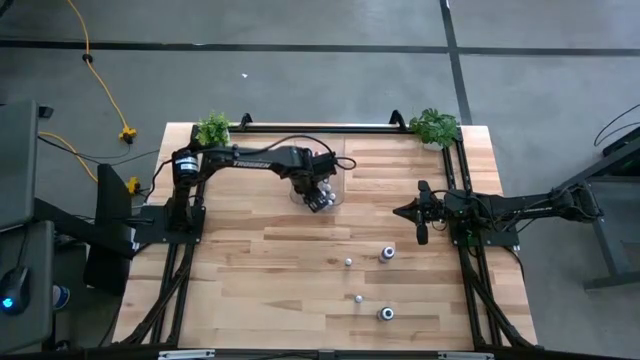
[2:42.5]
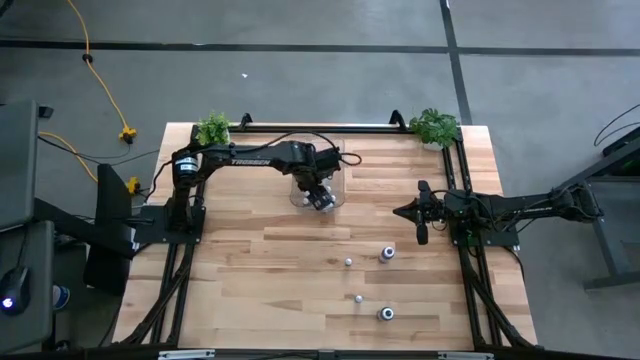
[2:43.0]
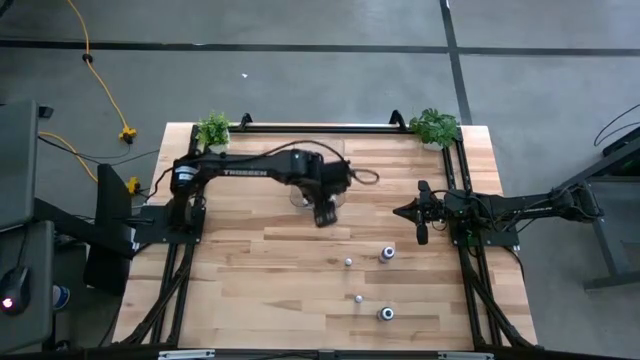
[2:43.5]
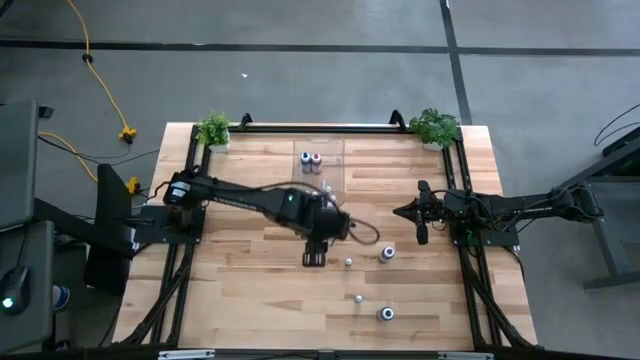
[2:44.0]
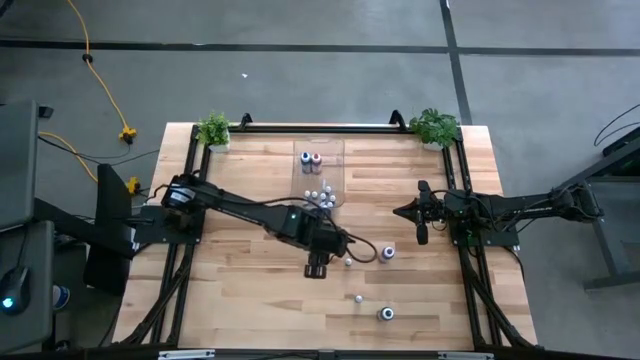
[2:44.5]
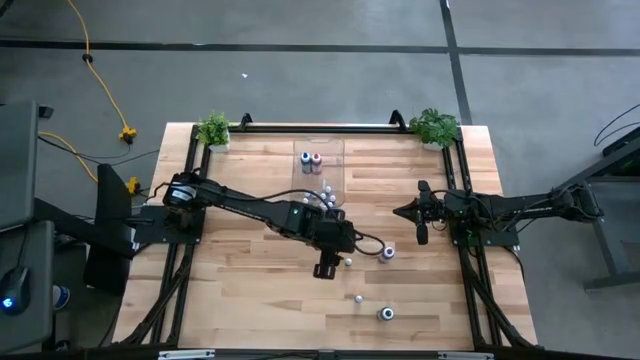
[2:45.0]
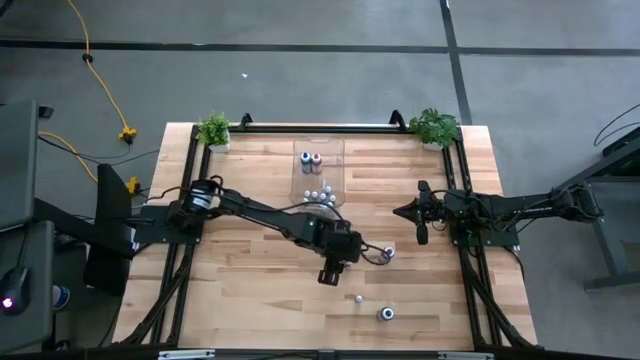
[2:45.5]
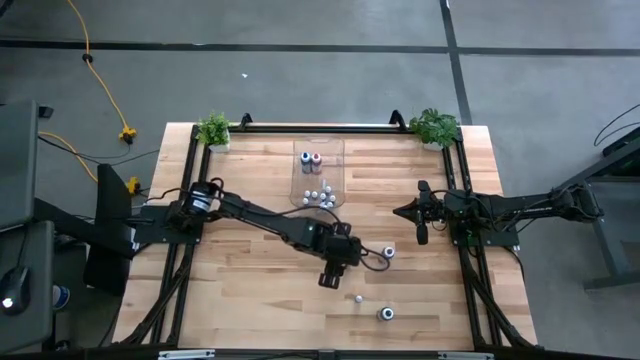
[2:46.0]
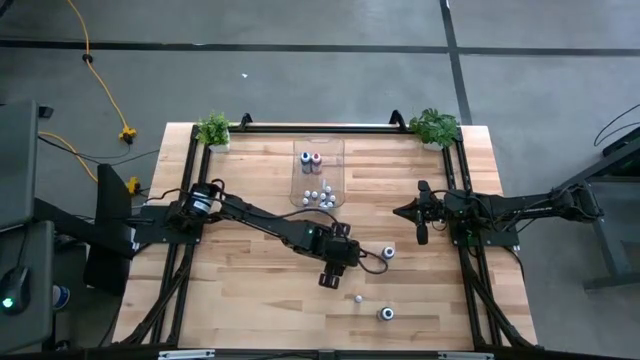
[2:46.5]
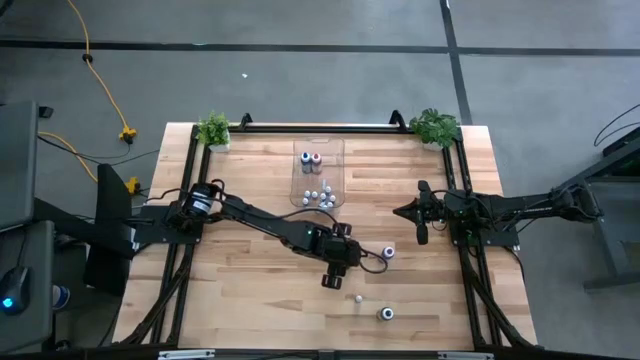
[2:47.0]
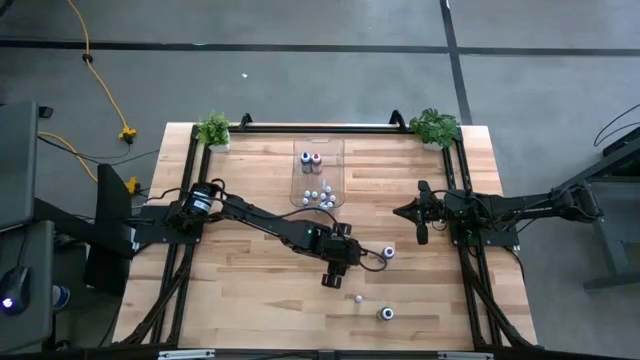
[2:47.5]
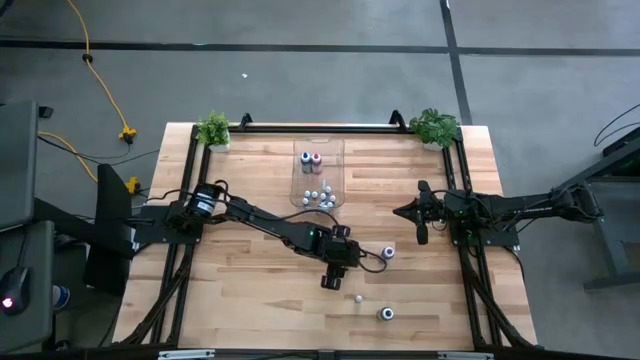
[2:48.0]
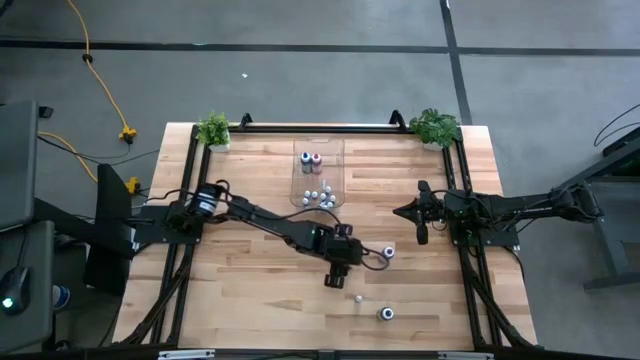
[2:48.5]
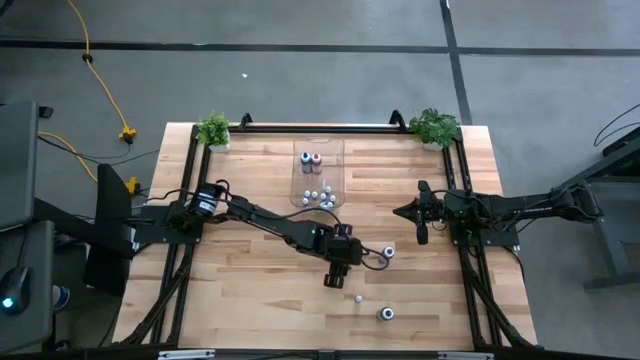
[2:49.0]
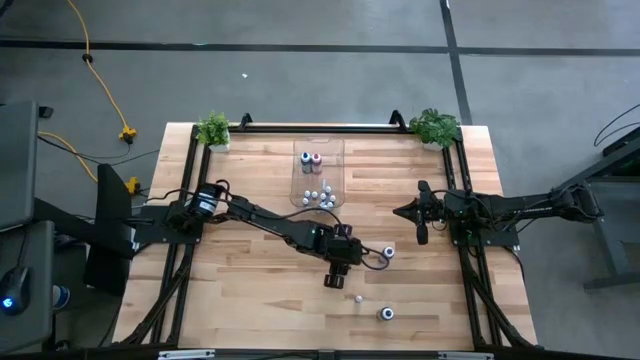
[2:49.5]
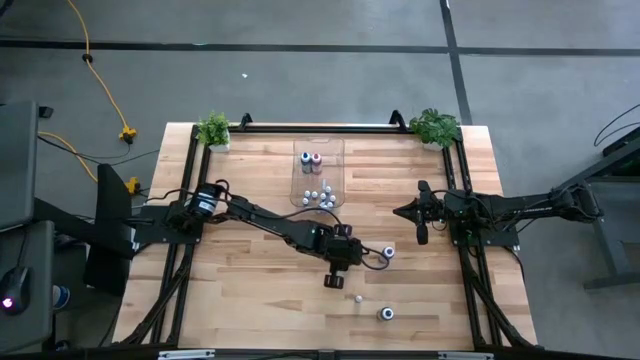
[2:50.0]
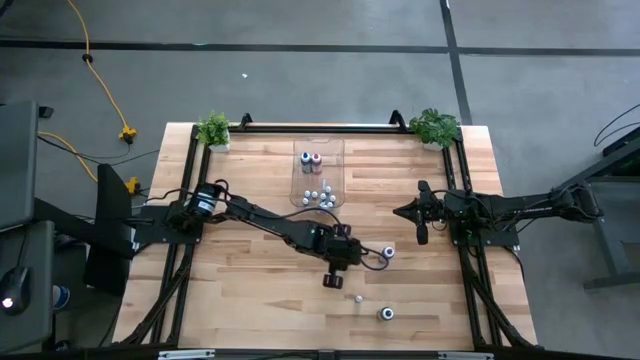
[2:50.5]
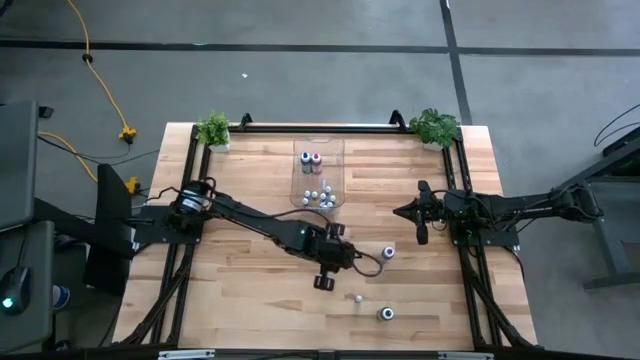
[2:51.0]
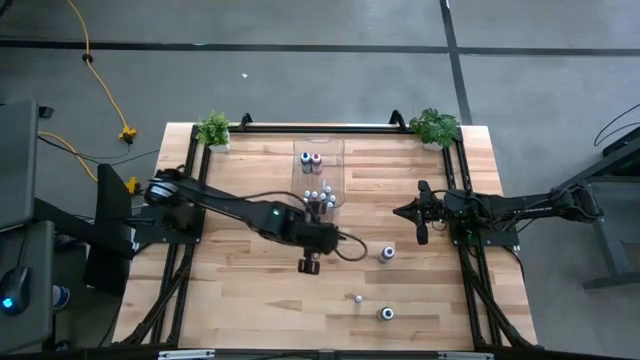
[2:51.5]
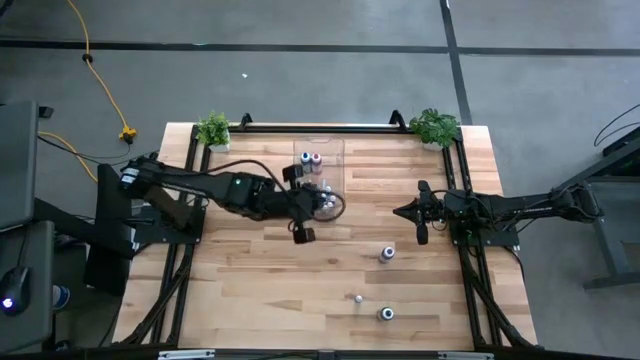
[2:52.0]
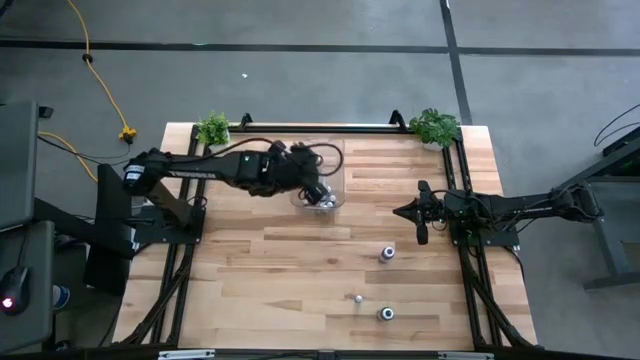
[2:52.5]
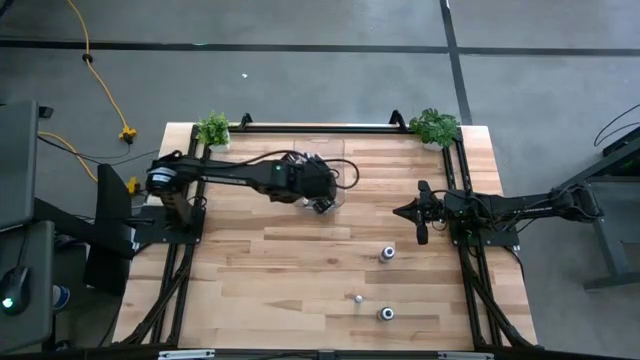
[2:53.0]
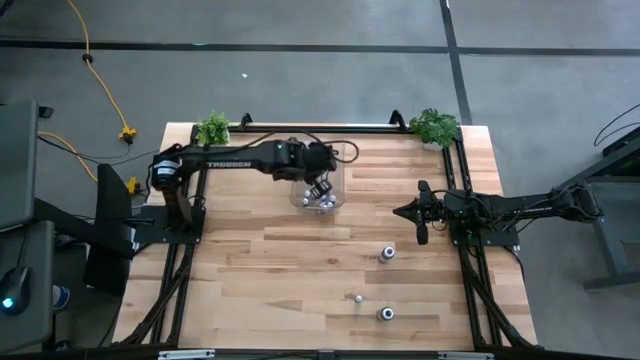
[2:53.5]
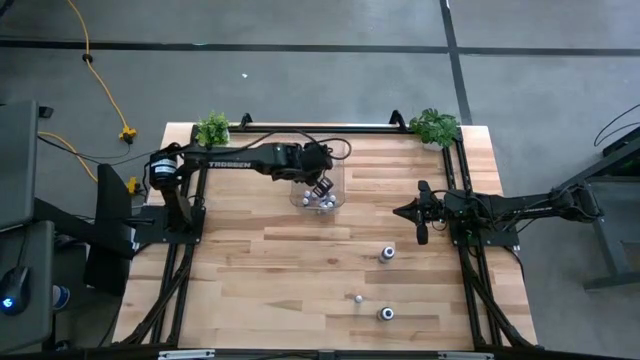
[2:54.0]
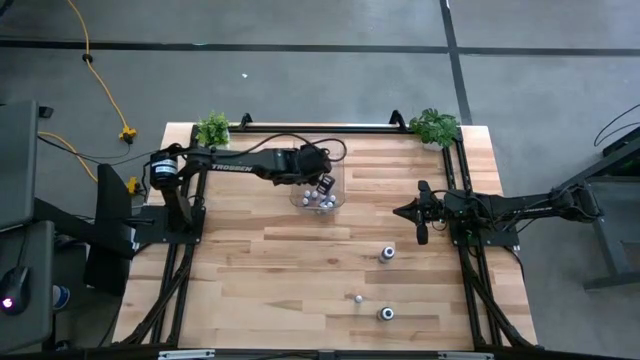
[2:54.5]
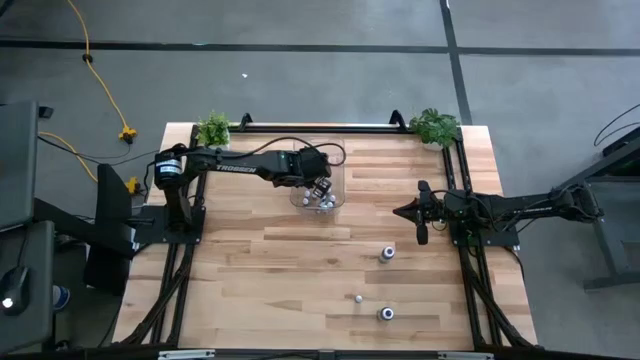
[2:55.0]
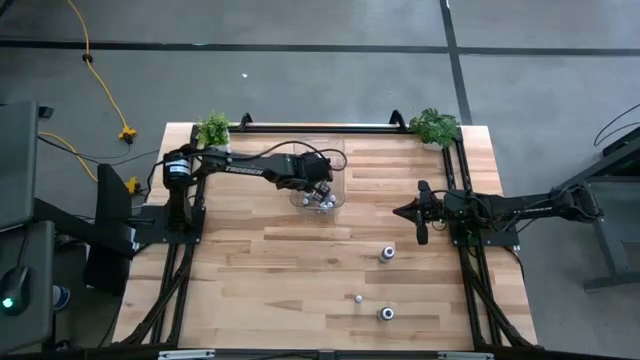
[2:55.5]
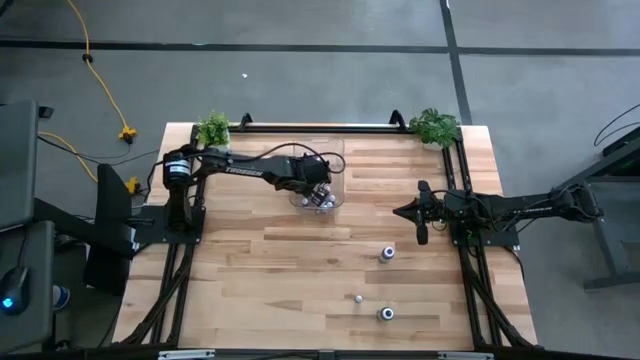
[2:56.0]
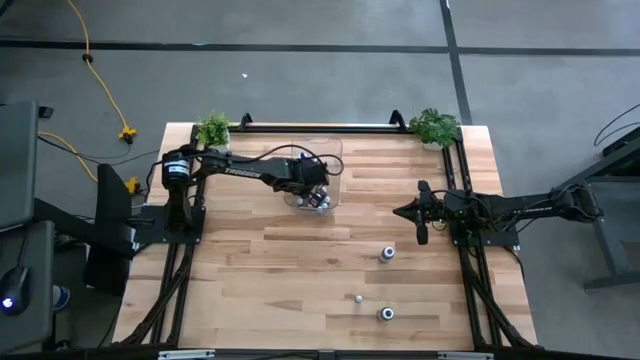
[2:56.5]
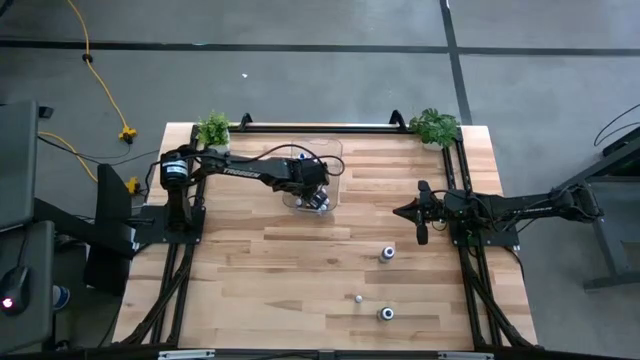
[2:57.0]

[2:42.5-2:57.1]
Task: Pick & Place food coloring
Put the small orange food coloring into the transparent bin

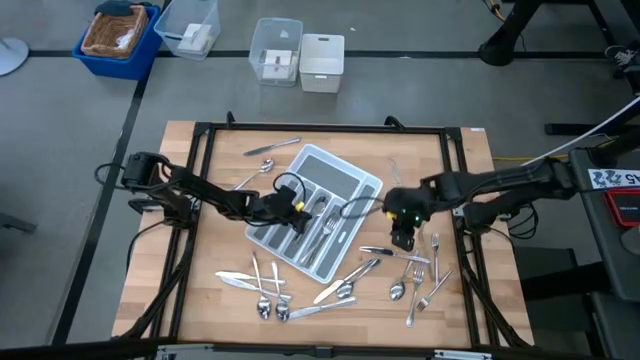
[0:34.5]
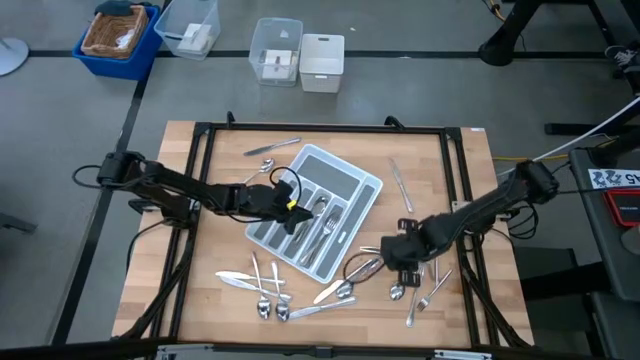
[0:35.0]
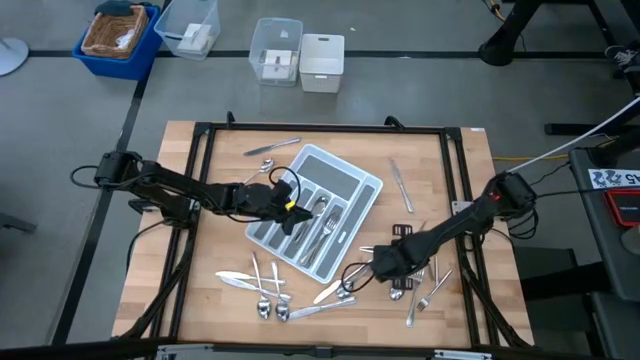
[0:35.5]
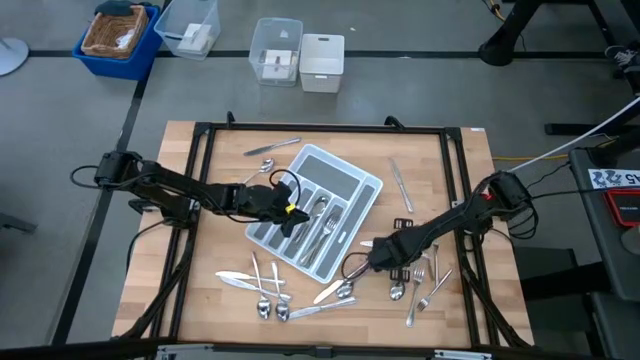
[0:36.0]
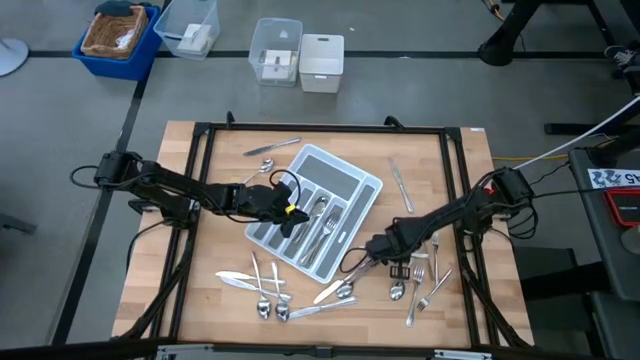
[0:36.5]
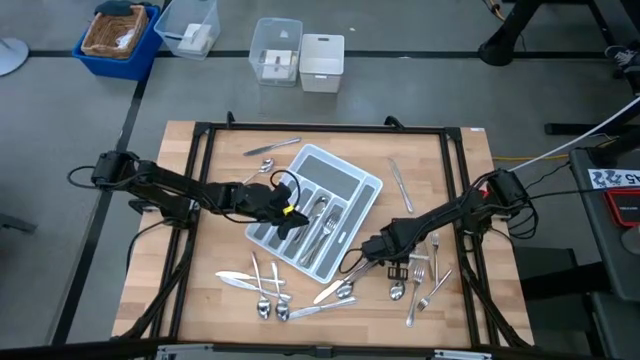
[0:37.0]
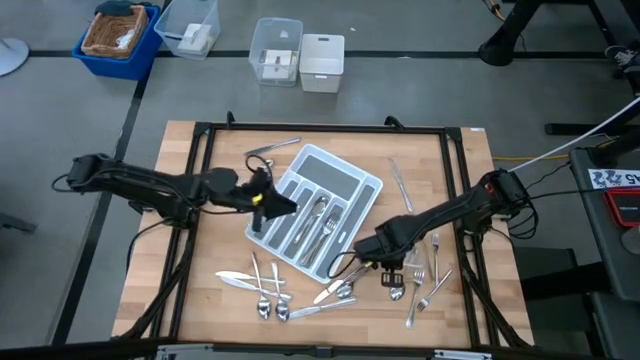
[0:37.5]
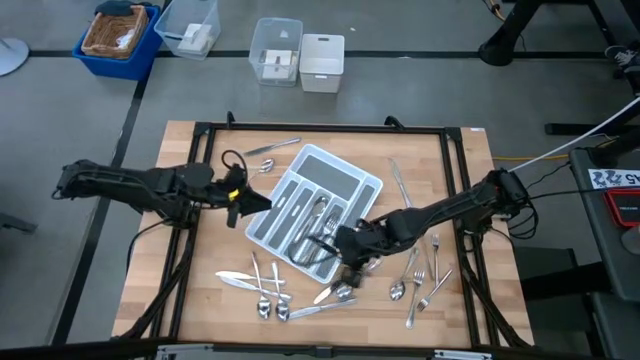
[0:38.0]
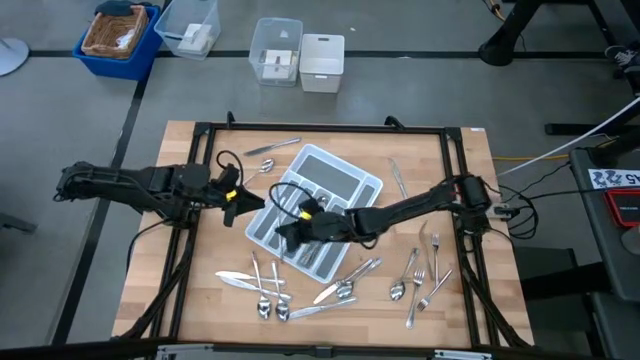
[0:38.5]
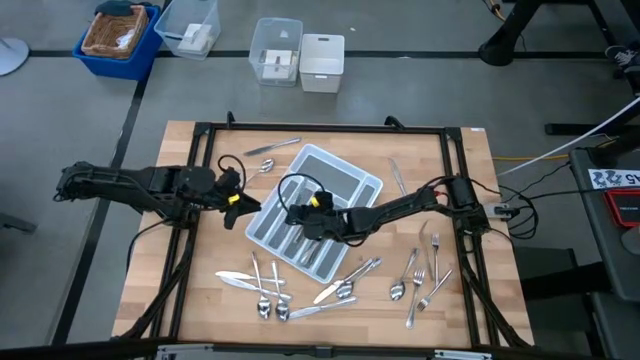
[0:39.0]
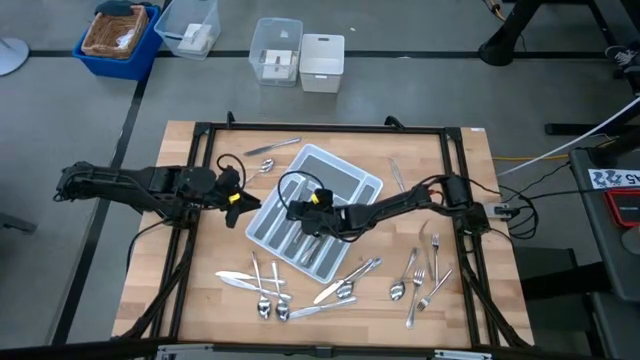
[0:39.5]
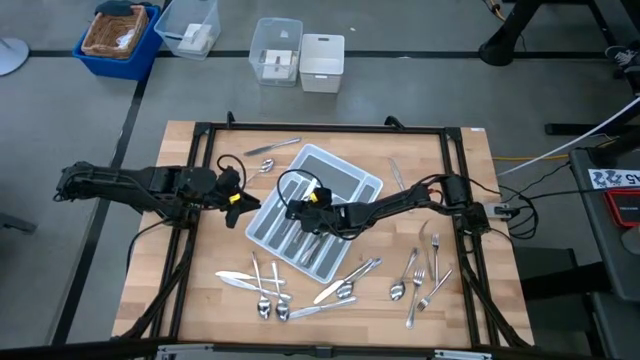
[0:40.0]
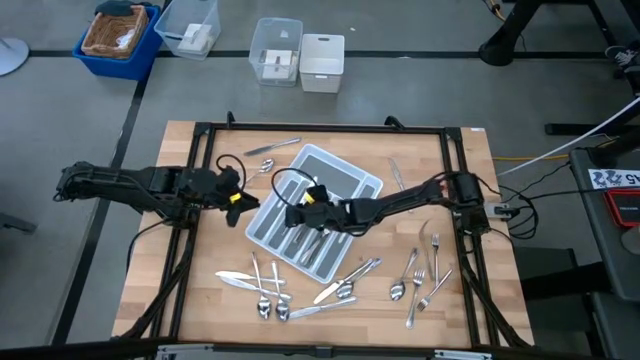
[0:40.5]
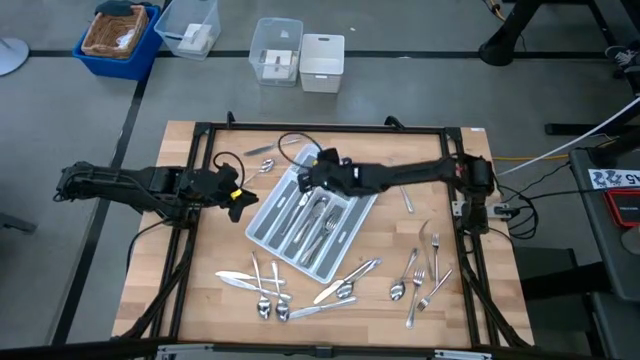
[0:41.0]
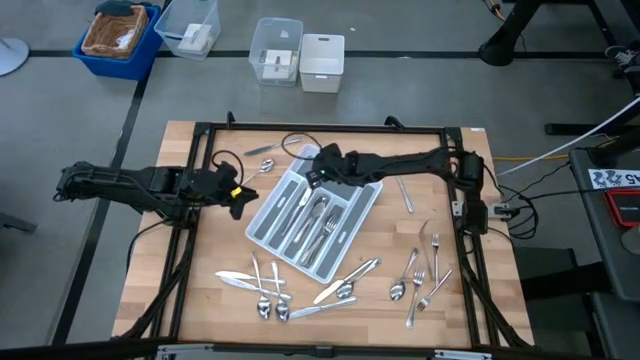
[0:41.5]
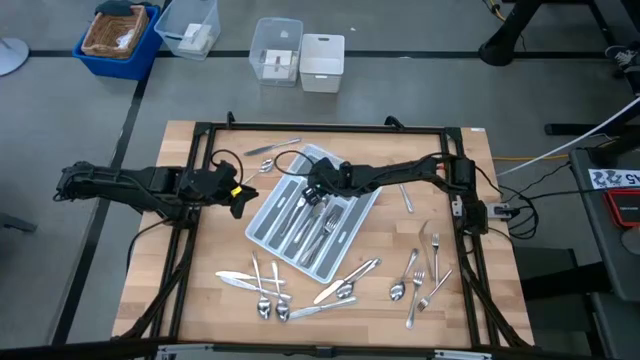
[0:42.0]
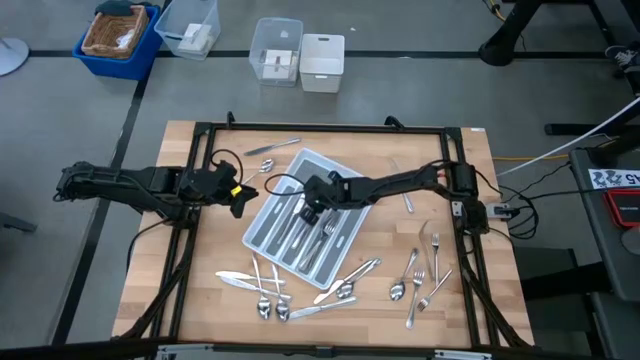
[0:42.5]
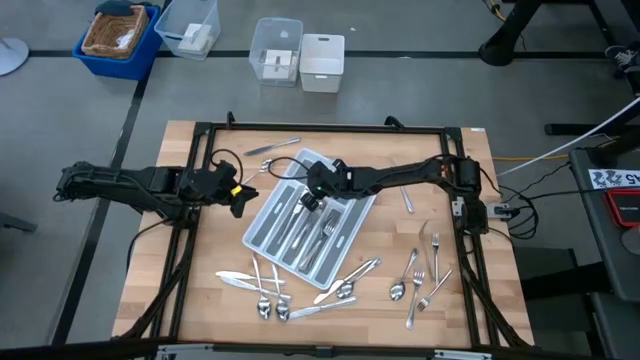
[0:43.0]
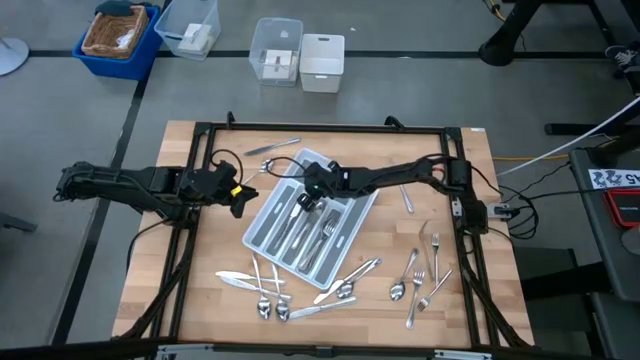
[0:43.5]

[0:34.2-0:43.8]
Task: Sort silverware
Put the silver knife into the white cutlery tray
